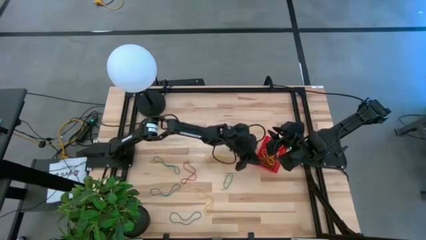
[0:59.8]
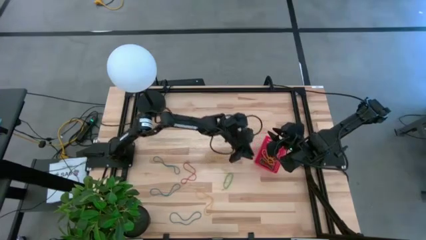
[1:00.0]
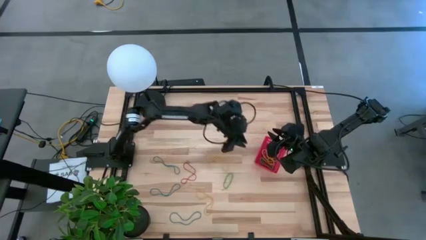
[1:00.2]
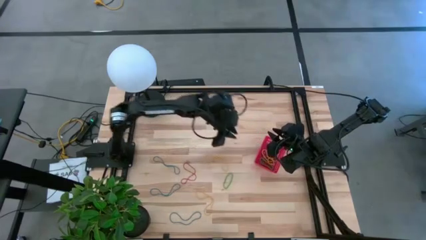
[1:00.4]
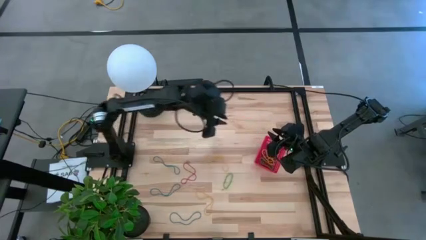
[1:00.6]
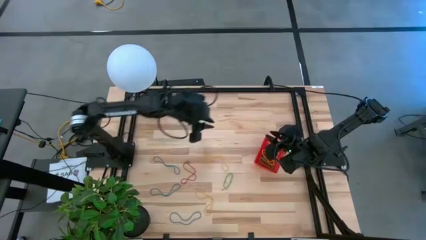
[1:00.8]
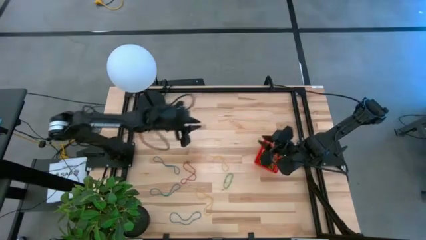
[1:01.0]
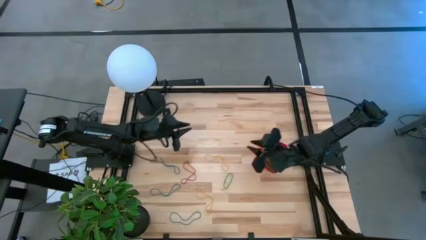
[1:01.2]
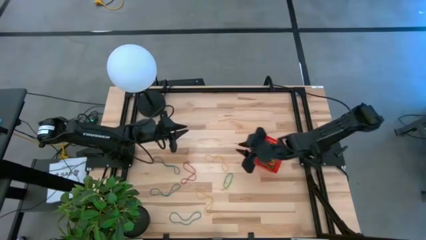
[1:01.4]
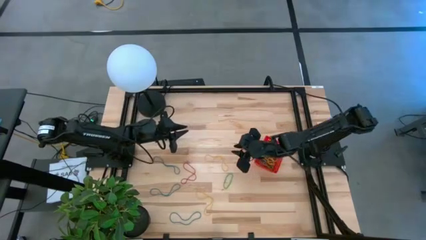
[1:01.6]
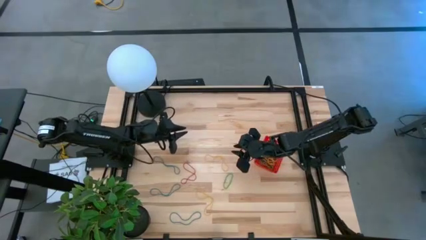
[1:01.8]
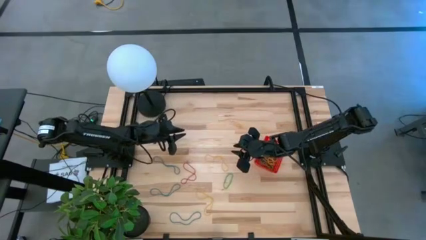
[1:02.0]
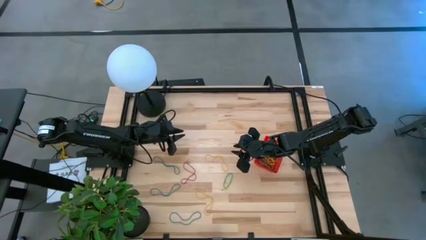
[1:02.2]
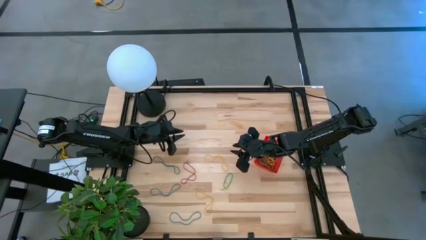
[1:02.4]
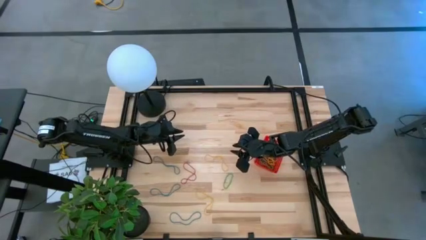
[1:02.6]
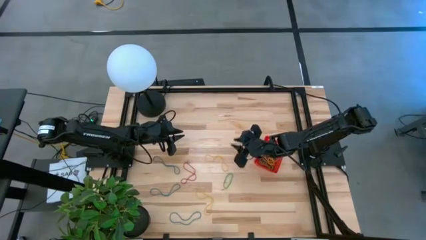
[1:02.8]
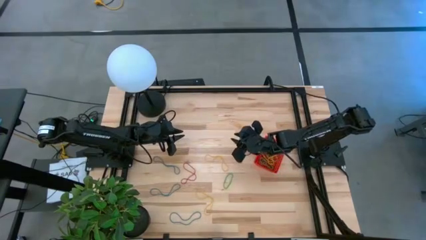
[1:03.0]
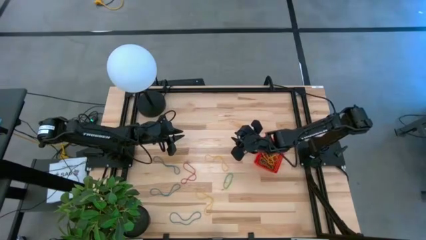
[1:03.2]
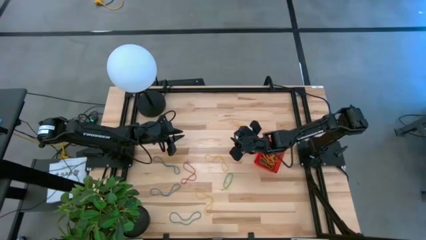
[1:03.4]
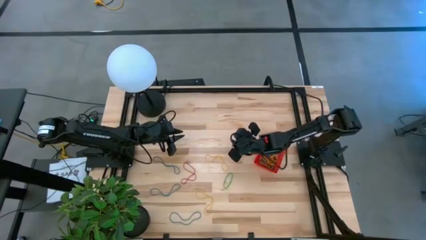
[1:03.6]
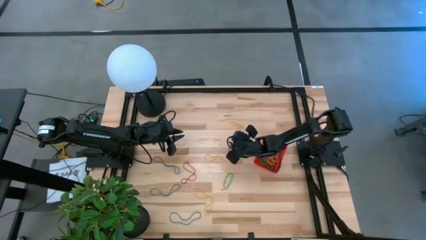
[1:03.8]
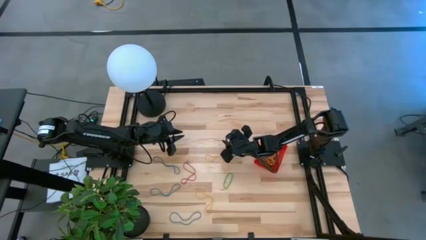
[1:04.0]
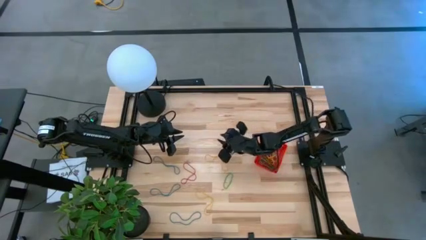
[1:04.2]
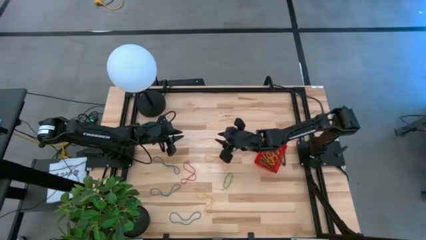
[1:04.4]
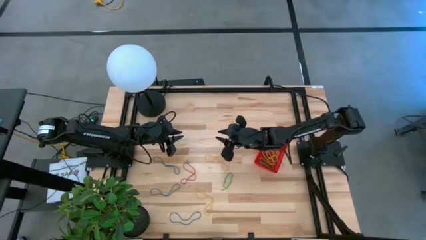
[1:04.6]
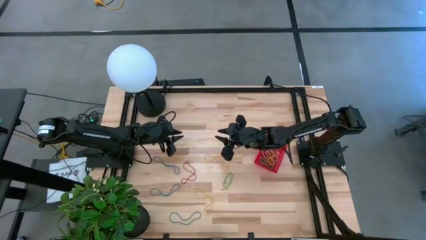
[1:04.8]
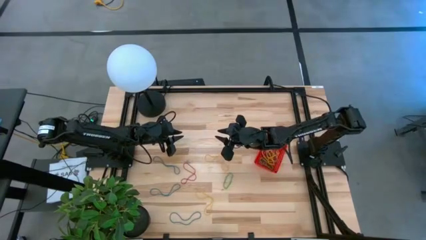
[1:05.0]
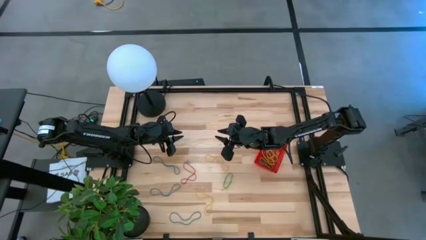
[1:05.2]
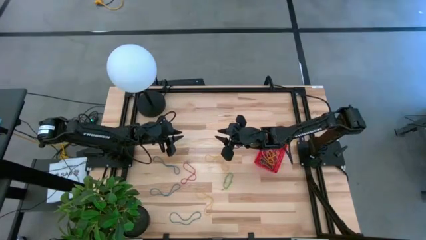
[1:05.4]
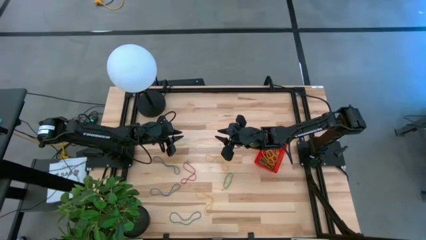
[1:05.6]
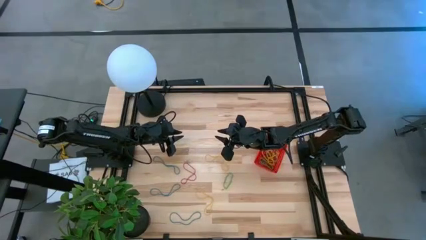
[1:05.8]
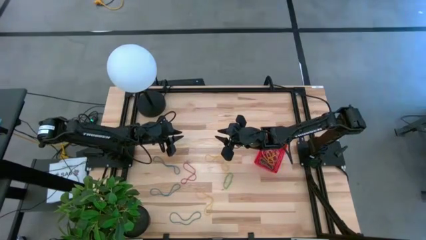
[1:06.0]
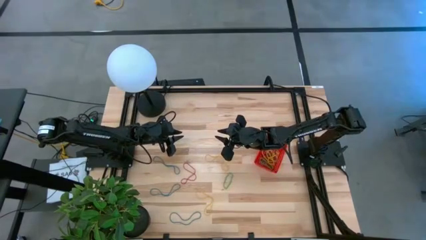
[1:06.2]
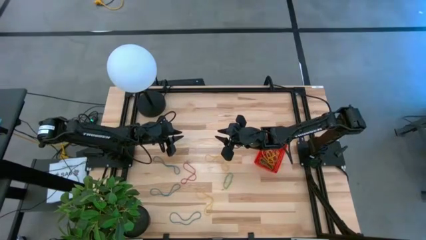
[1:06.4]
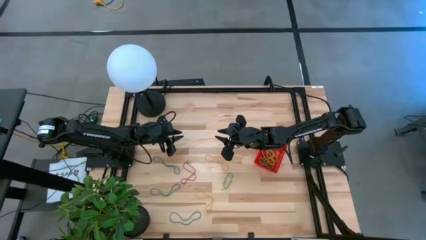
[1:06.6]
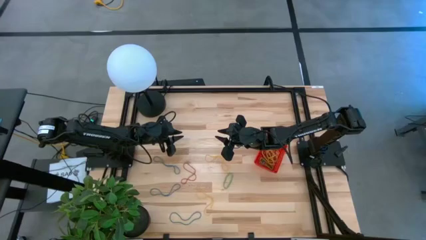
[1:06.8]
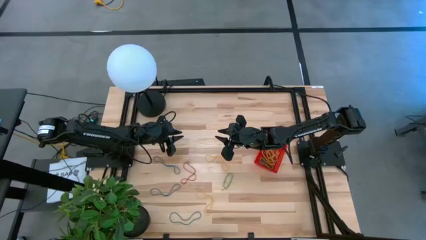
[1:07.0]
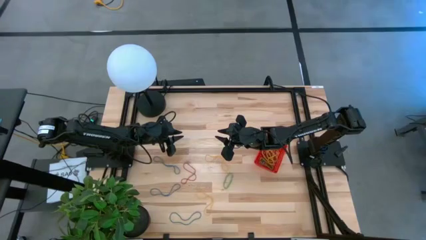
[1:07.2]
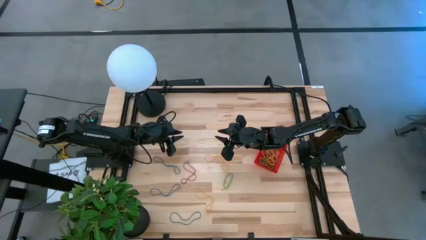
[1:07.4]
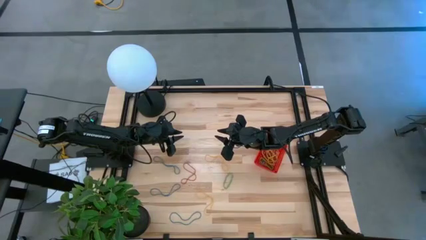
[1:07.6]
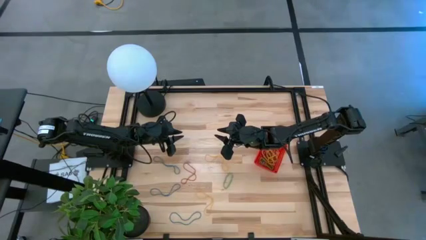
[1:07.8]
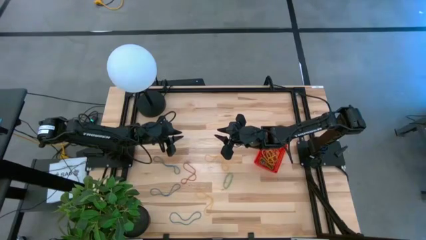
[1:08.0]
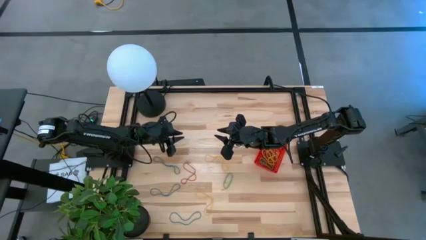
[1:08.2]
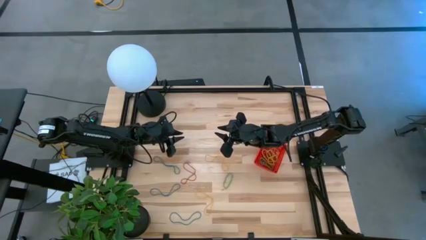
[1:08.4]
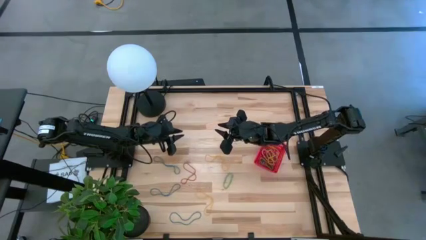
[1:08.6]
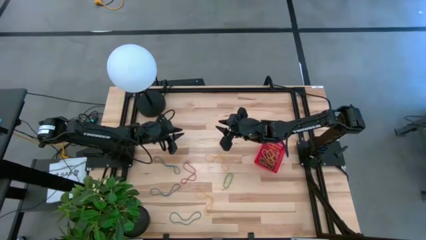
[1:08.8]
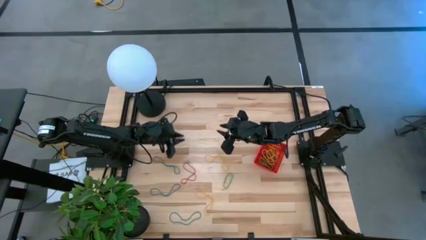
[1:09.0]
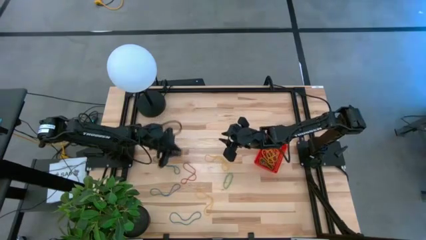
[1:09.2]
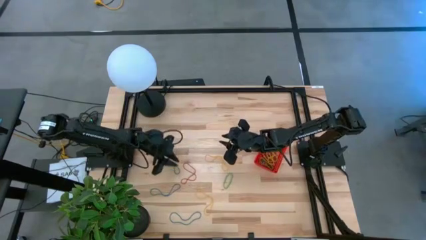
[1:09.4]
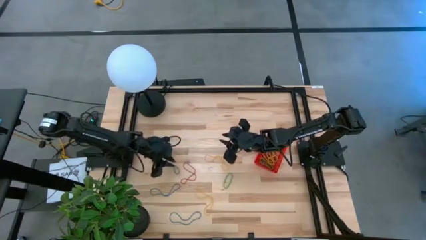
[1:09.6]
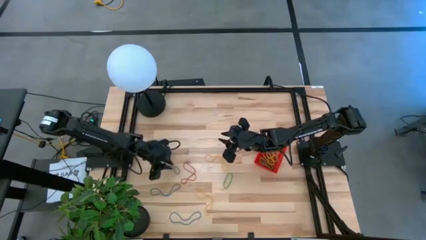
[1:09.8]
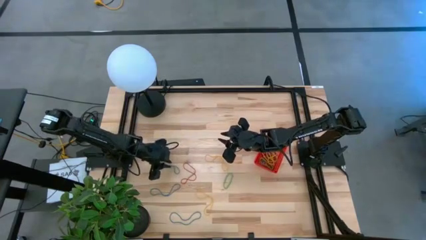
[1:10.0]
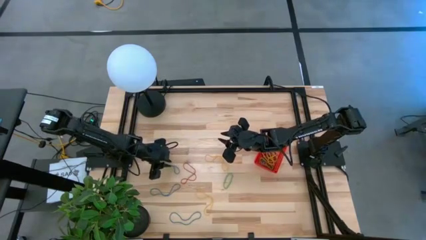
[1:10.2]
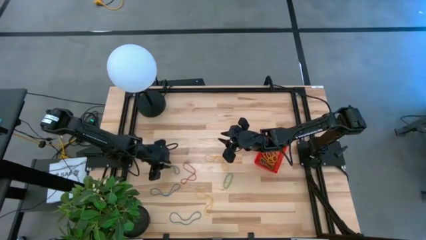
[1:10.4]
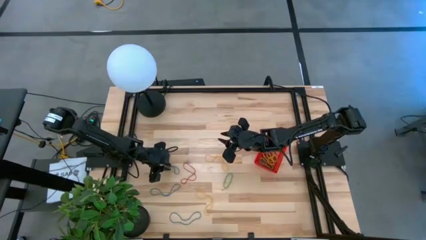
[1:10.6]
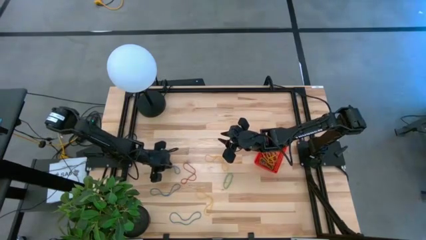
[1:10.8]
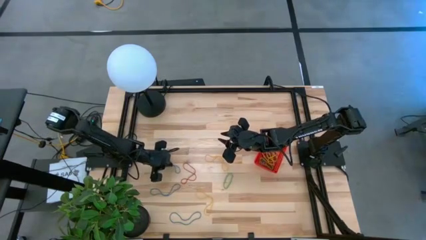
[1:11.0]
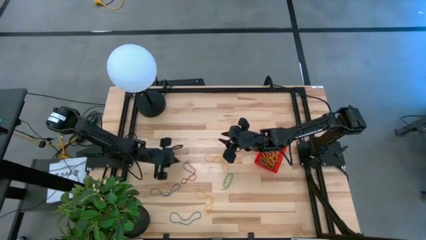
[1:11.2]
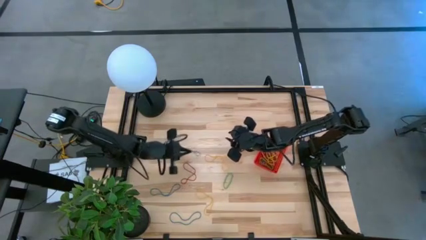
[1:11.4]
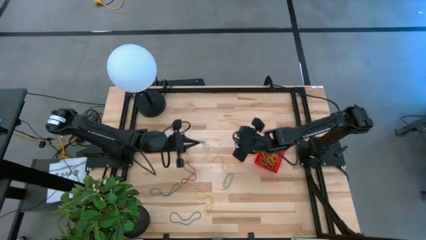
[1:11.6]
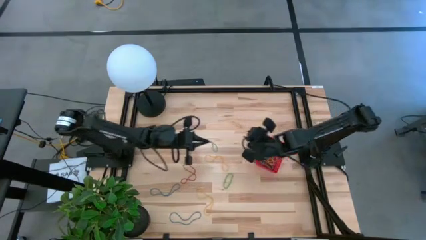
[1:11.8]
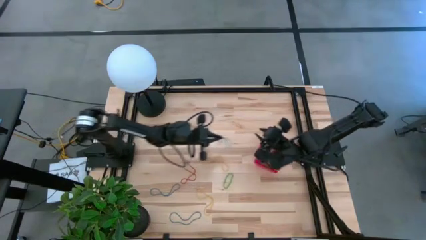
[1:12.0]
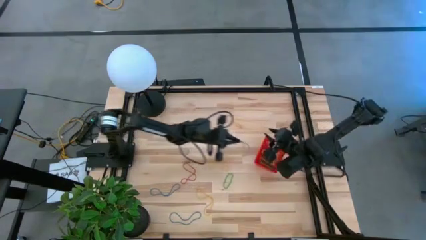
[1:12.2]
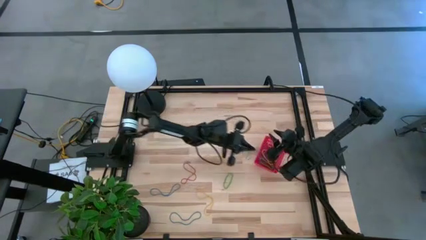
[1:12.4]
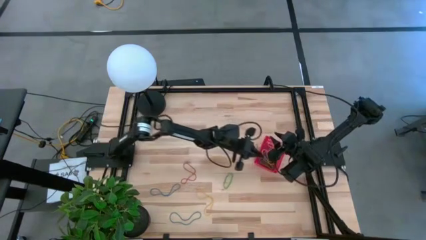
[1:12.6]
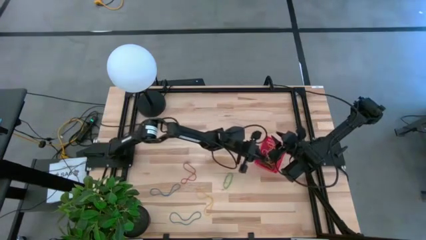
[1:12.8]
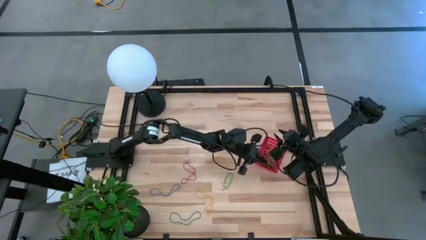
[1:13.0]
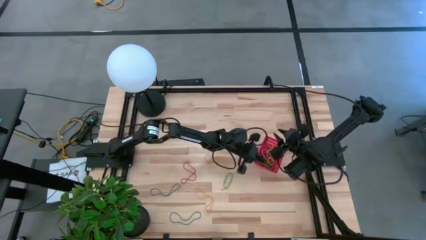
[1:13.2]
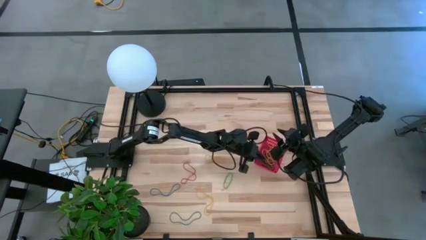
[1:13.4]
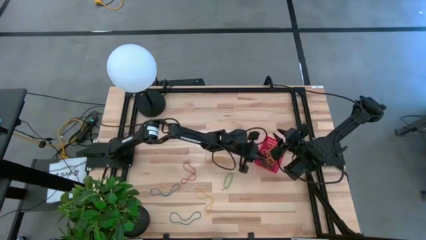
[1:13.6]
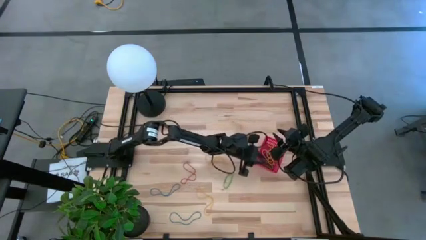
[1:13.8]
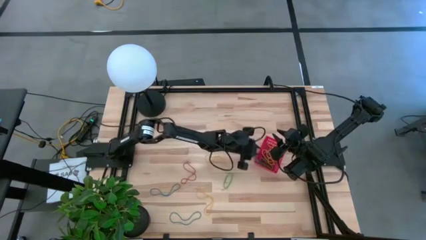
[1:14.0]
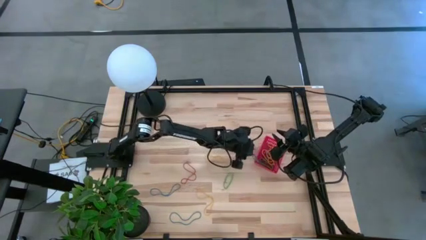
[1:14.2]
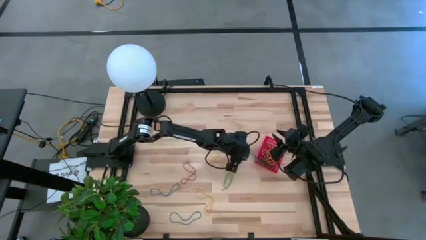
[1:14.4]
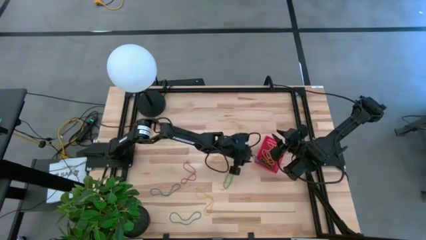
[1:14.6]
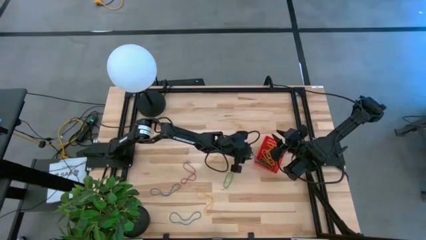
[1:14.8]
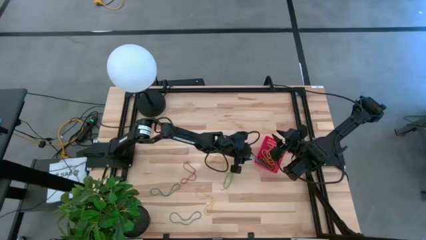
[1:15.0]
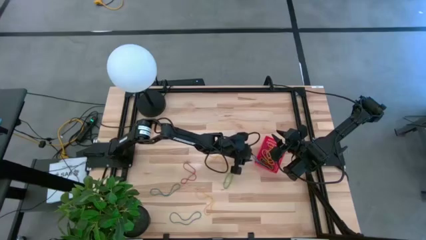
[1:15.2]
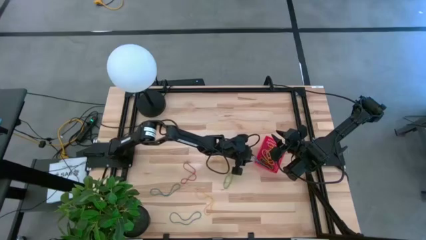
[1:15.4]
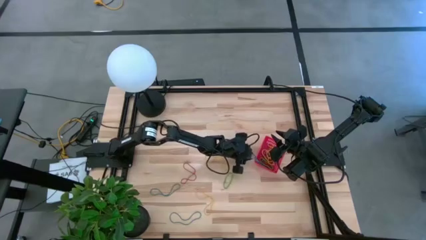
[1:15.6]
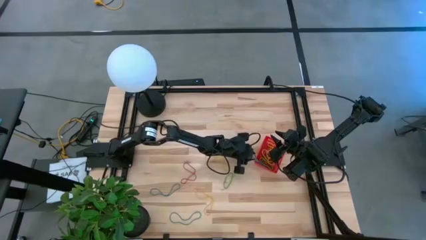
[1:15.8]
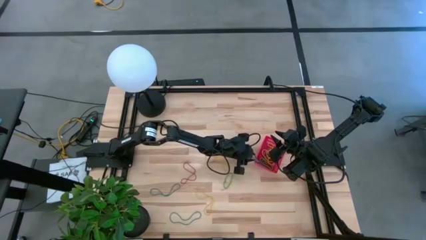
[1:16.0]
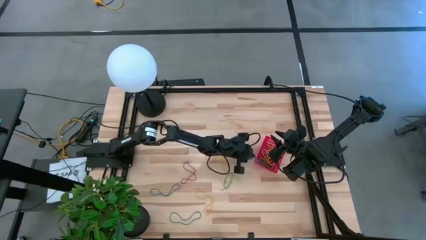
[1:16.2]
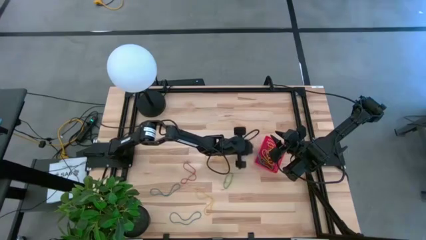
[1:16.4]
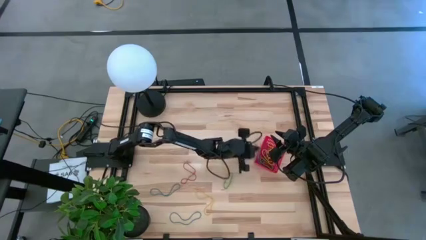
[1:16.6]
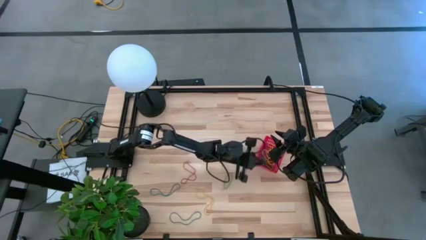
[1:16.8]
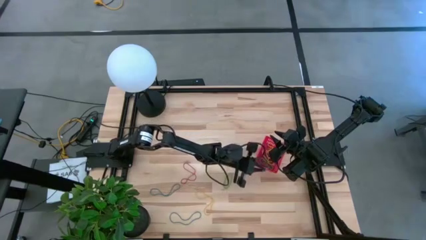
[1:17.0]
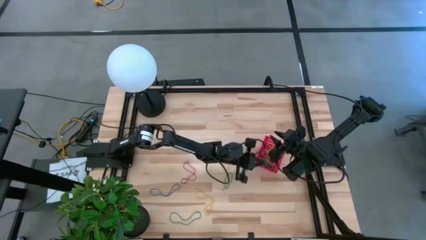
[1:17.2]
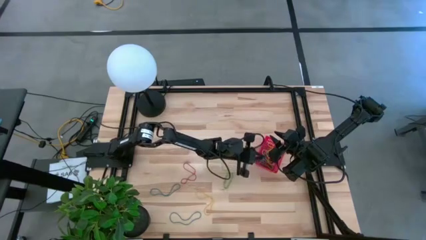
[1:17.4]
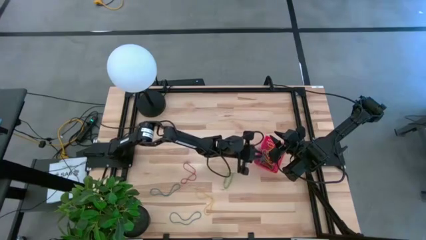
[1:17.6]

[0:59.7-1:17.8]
Task: Pick and place rubber bands into bin
Put the blue rubber band into the basket
